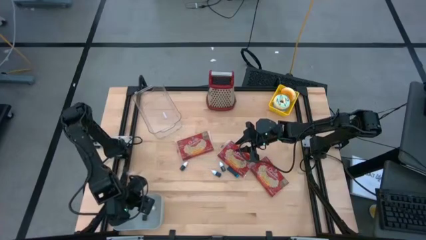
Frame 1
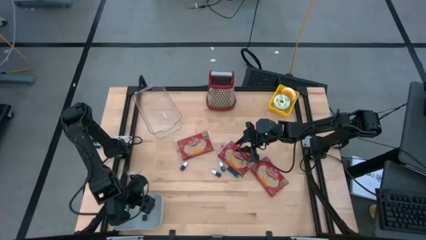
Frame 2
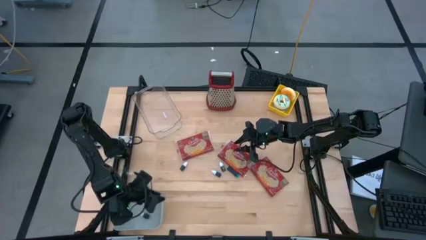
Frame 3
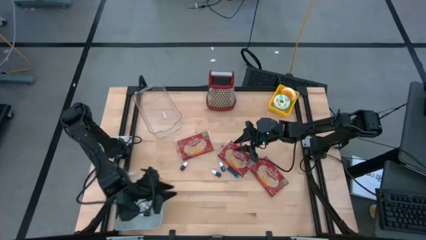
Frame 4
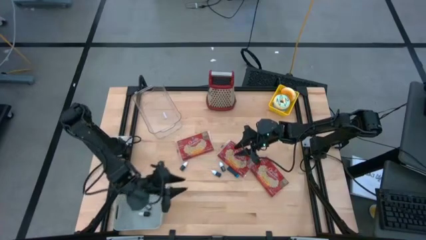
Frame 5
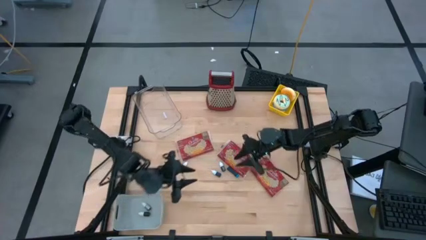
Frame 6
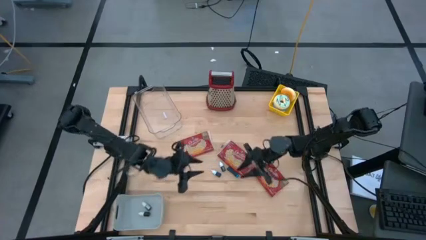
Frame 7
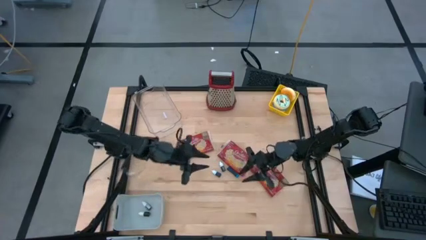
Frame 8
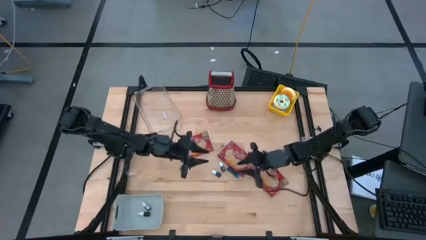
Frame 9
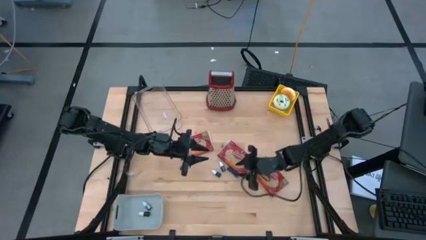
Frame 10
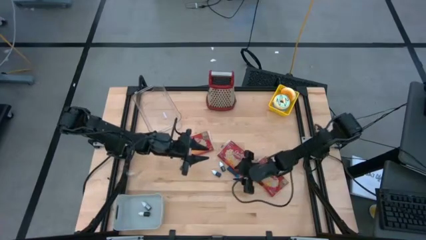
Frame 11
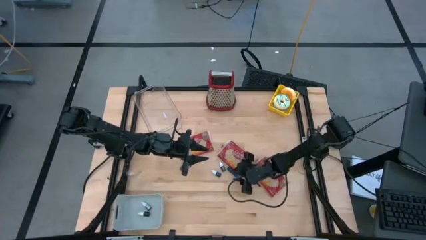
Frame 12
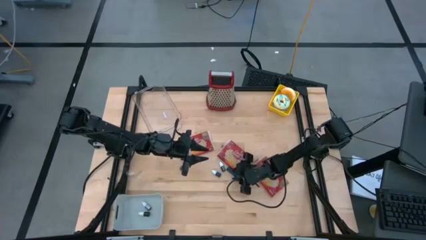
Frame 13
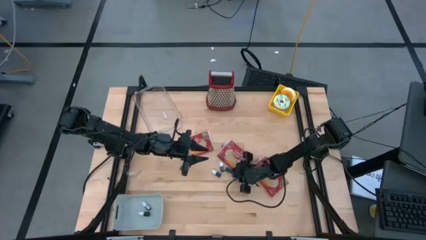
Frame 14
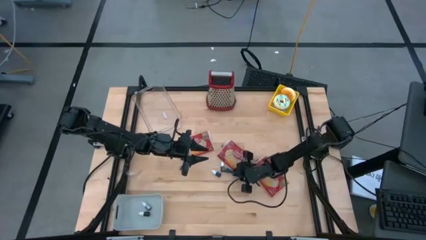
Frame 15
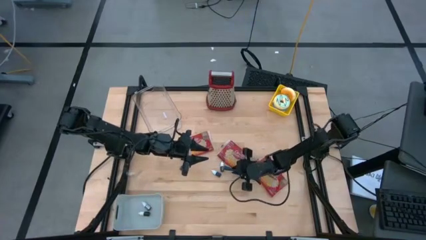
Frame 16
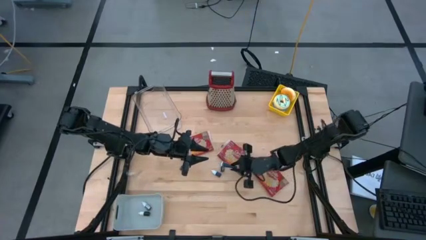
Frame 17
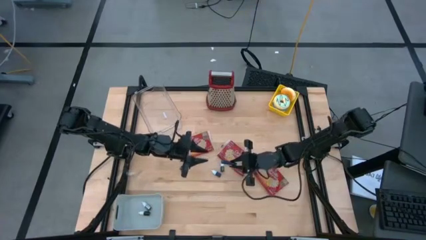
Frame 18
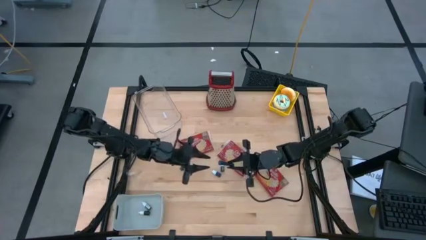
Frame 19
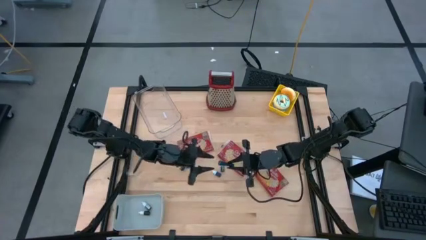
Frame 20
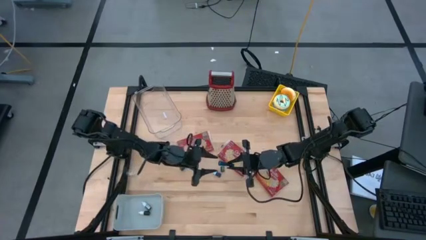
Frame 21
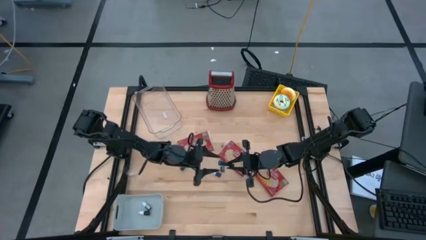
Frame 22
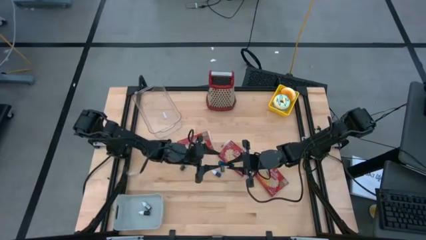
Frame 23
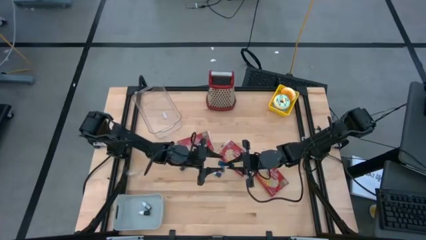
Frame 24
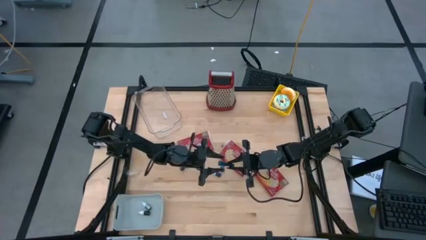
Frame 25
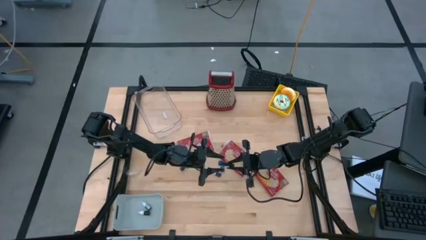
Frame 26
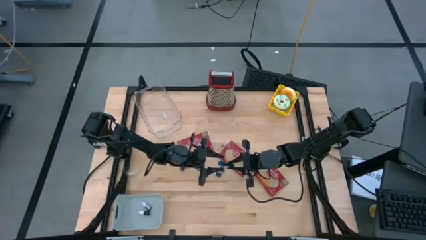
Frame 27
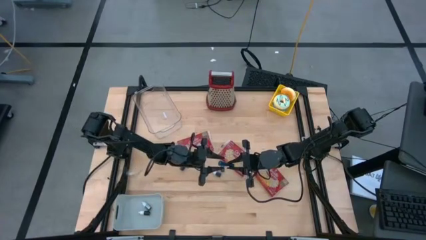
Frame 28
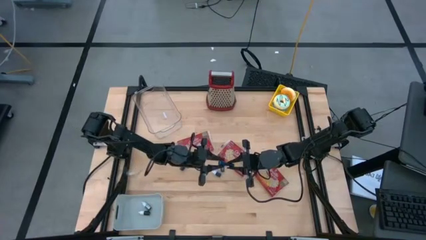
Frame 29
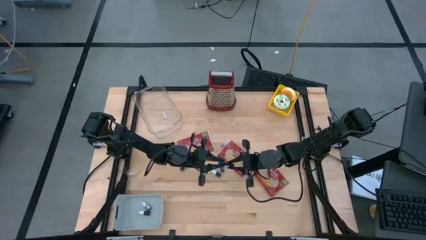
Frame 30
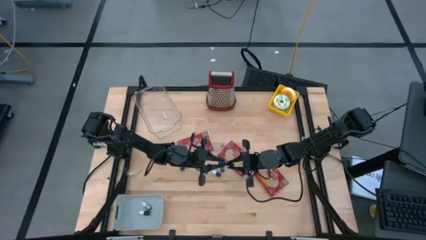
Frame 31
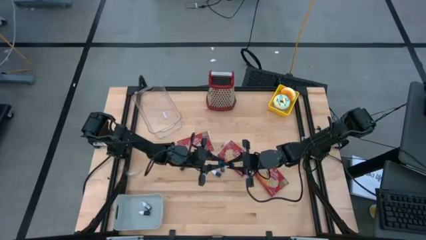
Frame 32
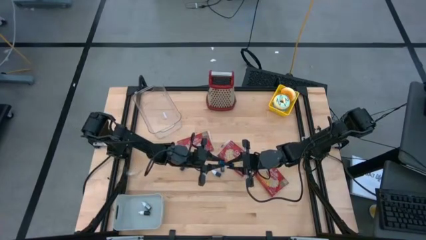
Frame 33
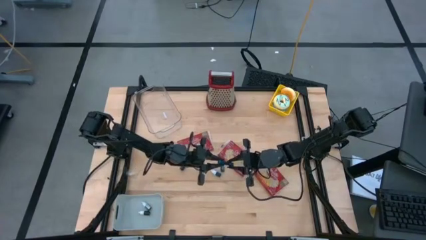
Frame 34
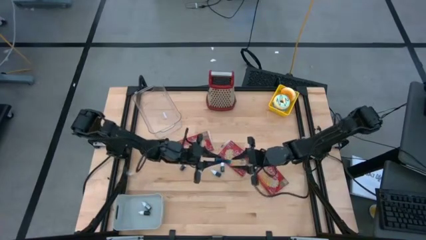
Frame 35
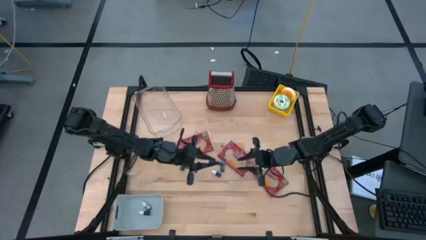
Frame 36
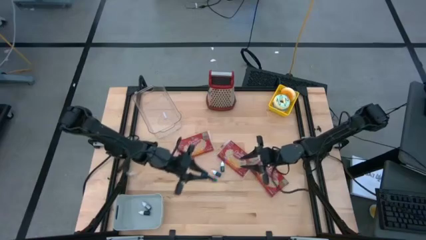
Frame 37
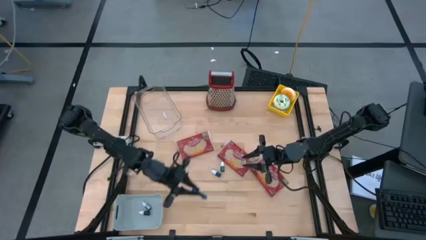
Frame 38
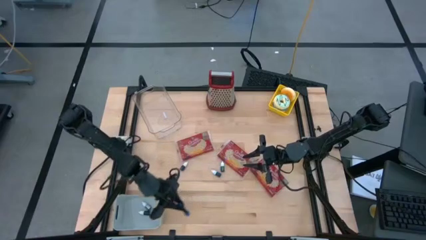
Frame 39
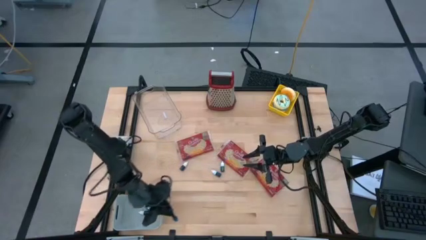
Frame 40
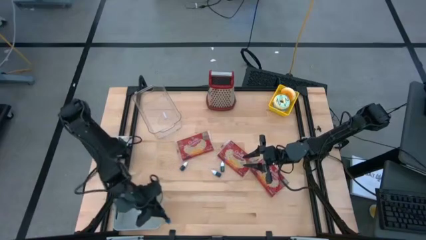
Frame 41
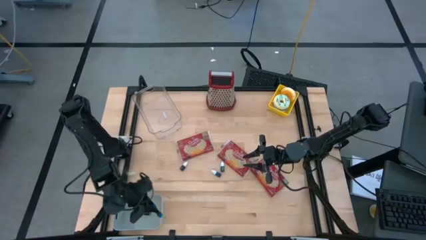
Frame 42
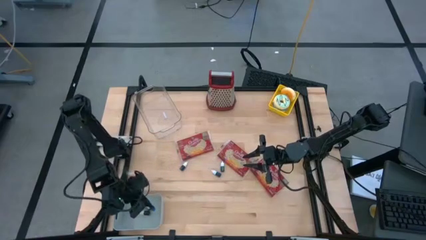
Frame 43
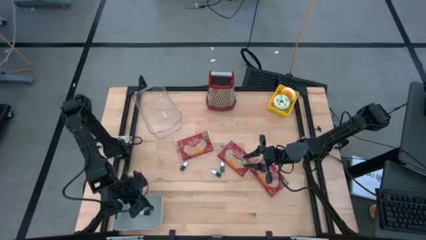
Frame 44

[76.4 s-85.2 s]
Put the blue food coloring bottle into the gray bin

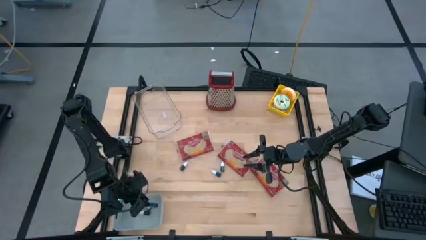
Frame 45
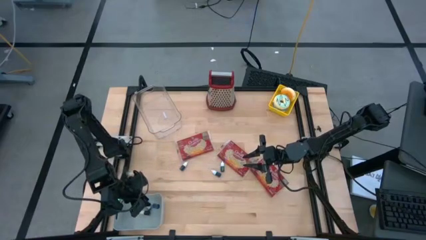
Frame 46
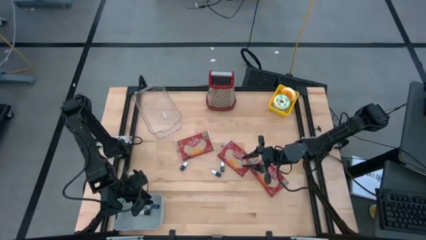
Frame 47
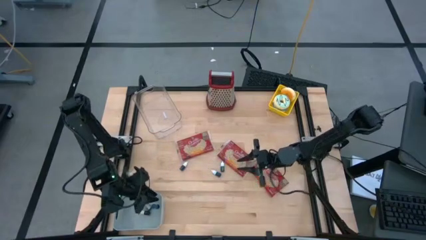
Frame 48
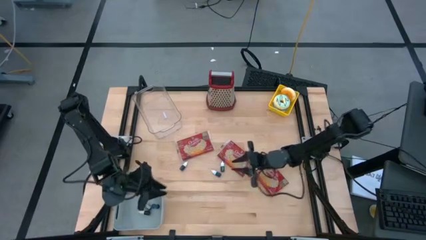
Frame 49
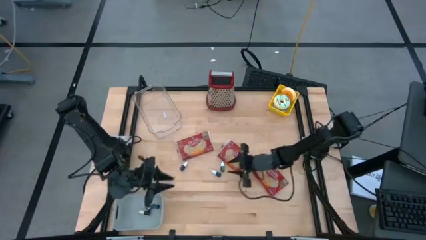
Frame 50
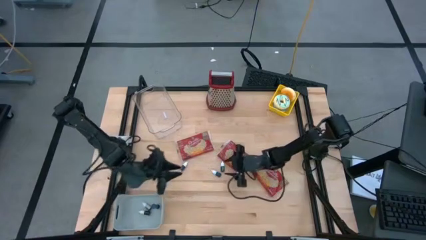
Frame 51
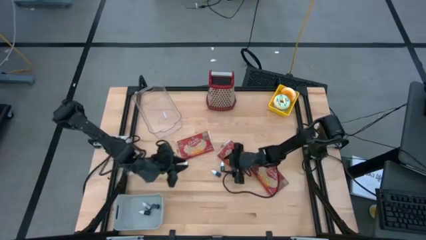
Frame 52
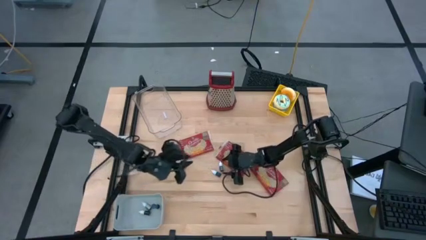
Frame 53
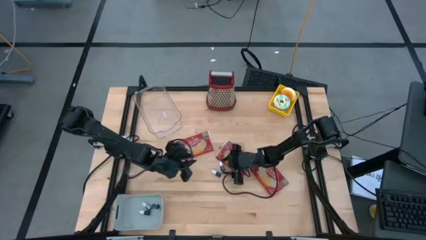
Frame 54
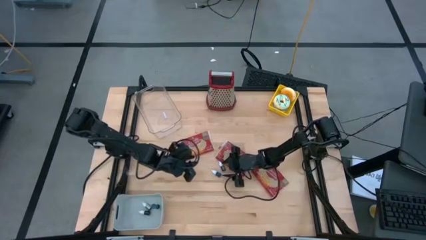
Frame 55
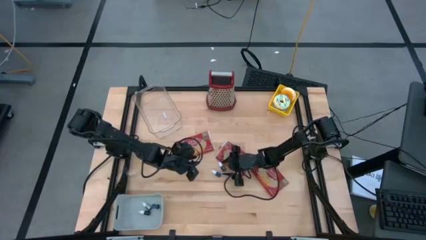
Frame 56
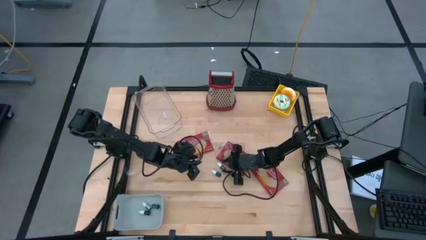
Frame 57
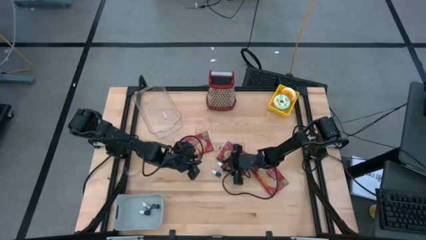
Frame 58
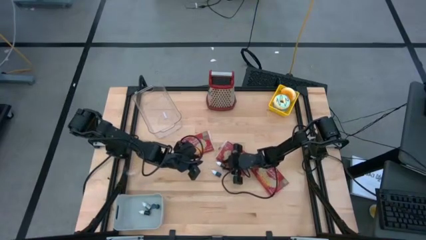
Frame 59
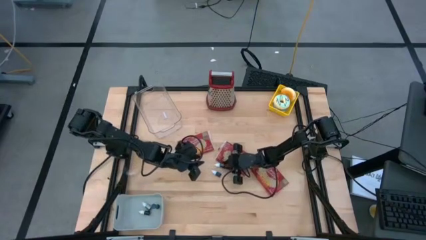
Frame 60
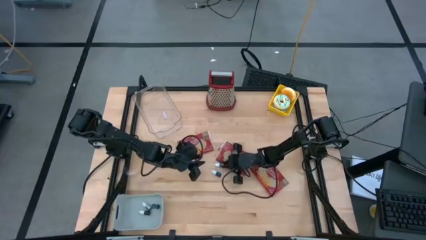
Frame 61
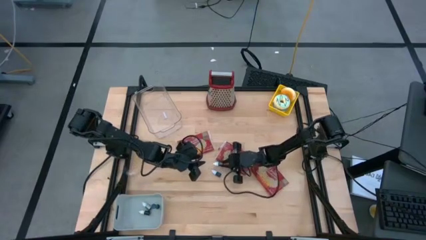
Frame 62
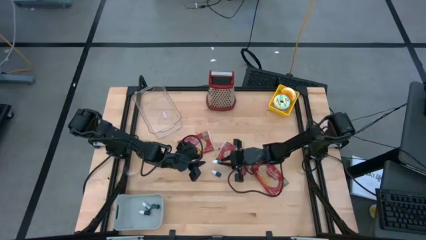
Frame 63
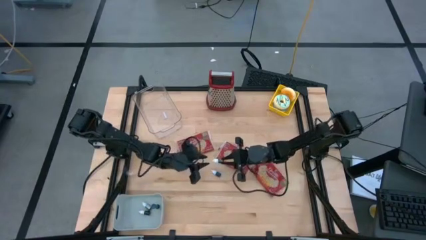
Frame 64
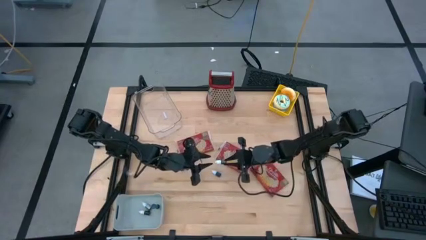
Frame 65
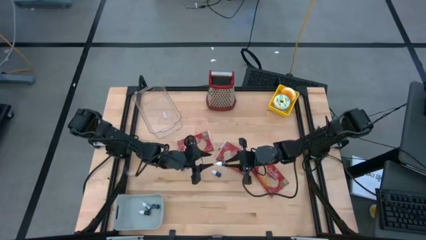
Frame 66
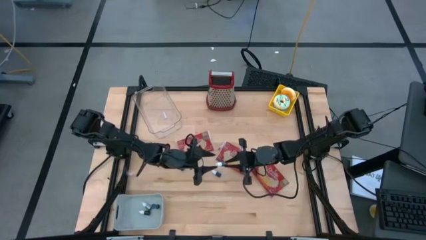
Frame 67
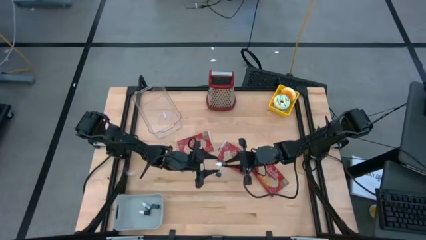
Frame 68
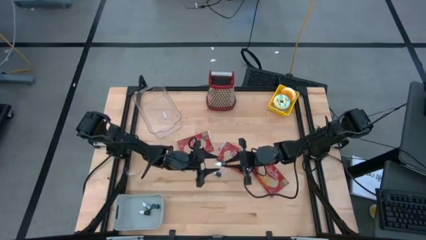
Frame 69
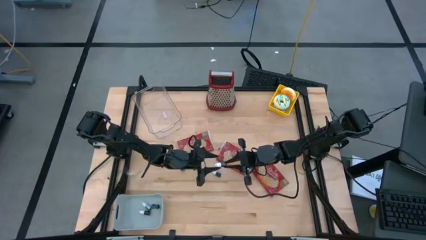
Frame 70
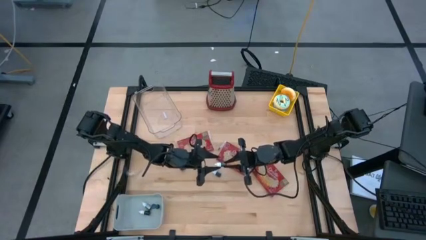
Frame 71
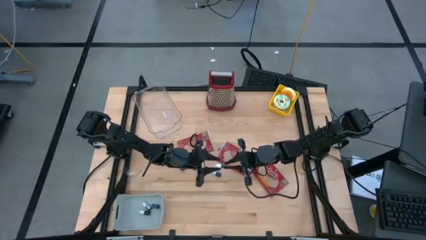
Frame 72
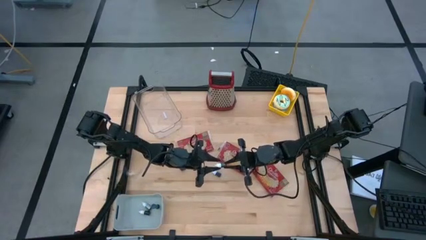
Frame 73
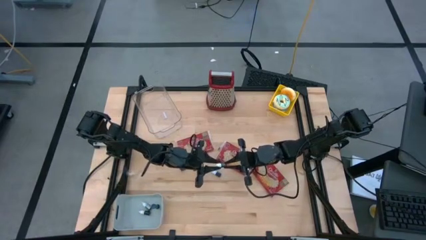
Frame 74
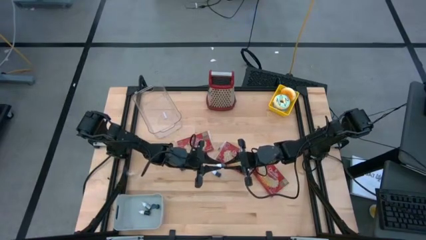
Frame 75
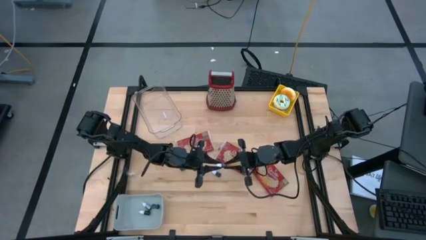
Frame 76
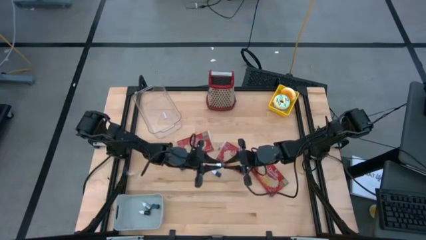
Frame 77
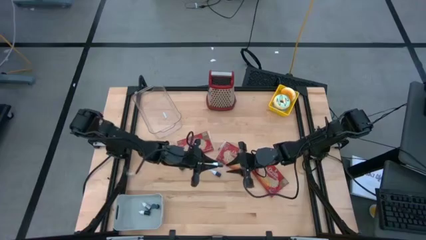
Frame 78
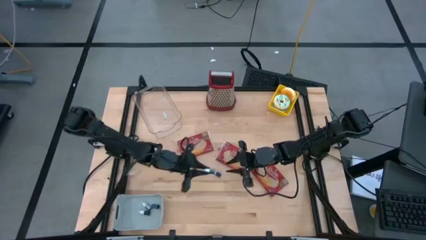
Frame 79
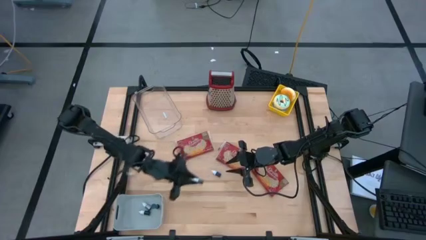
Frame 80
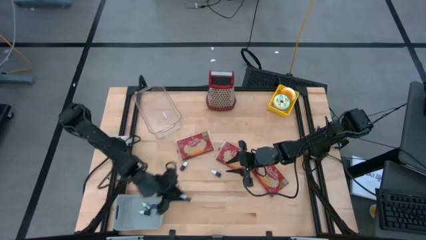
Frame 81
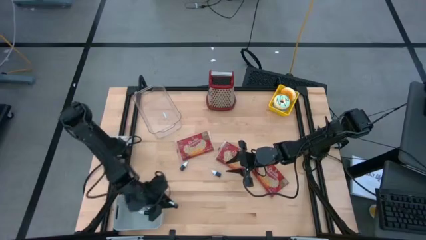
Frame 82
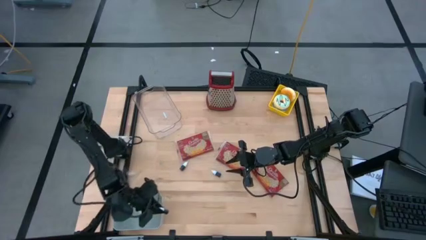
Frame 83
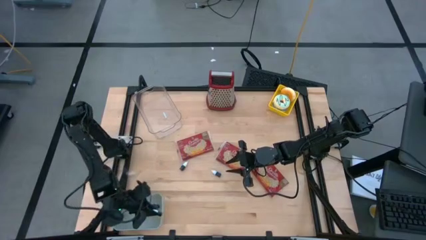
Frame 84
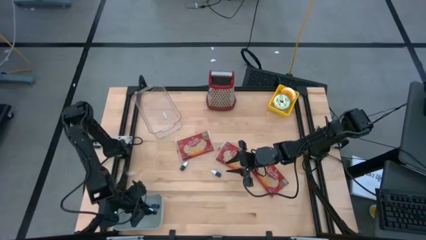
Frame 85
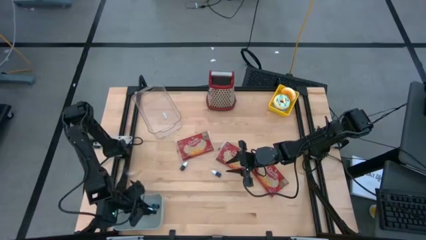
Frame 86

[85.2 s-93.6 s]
Put the green food coloring bottle into the gray bin
